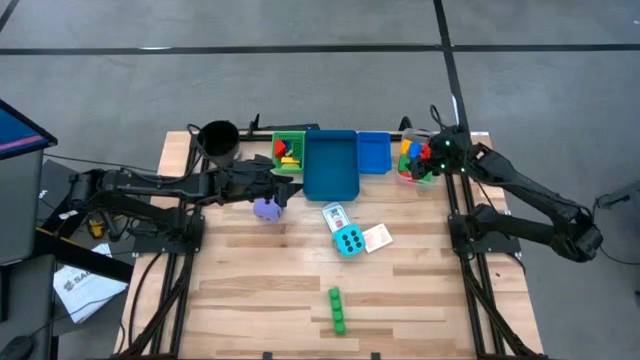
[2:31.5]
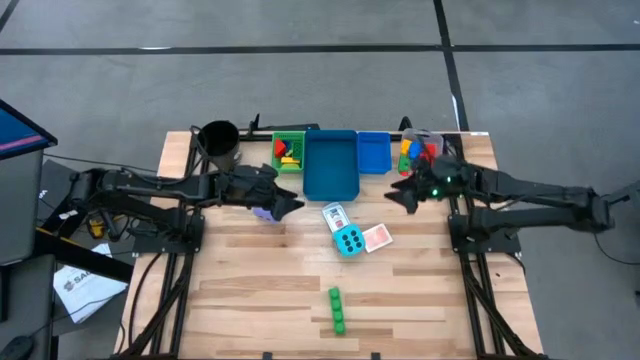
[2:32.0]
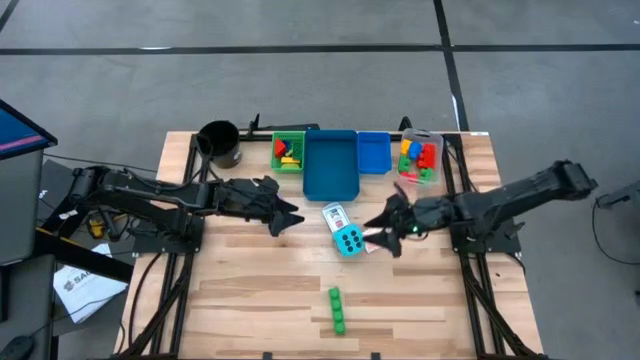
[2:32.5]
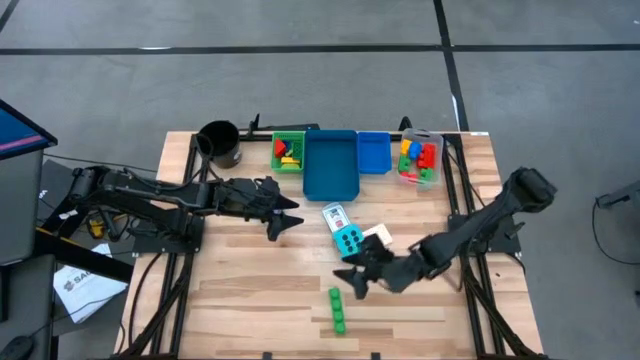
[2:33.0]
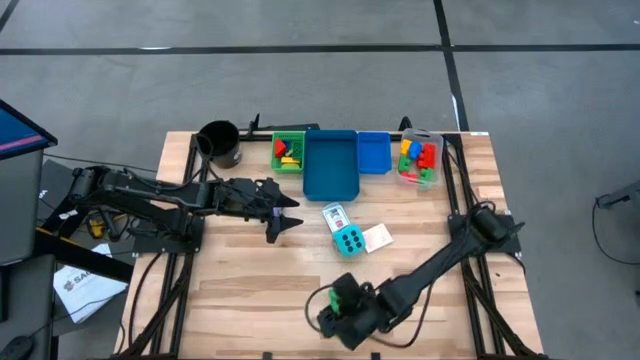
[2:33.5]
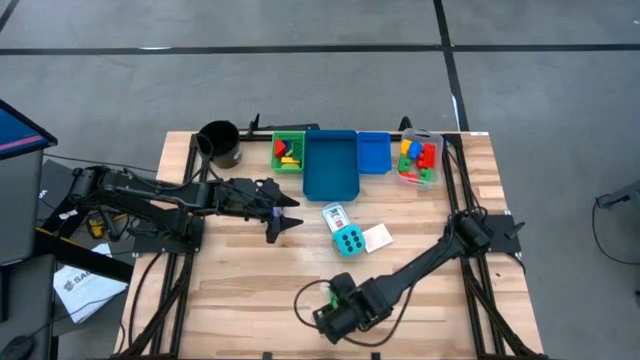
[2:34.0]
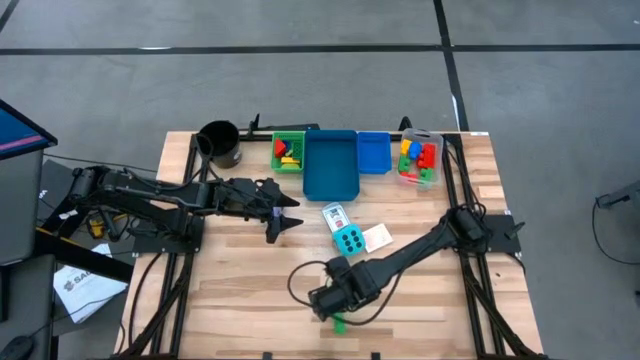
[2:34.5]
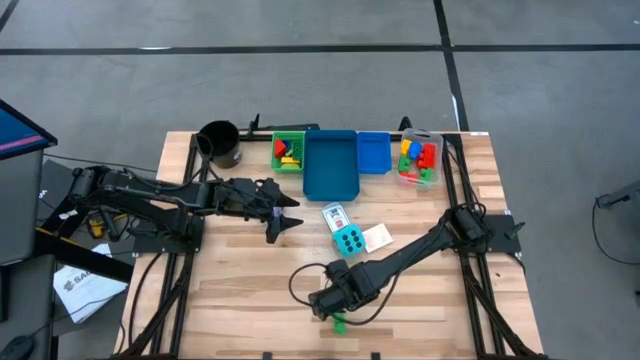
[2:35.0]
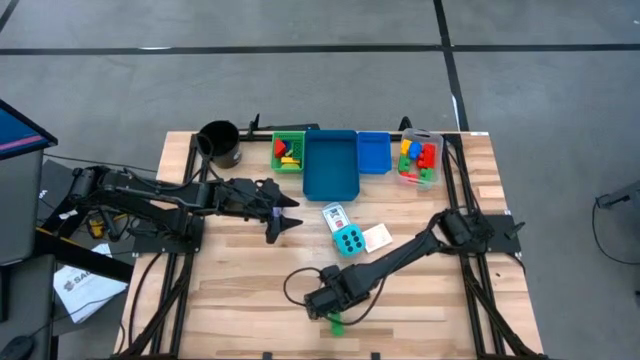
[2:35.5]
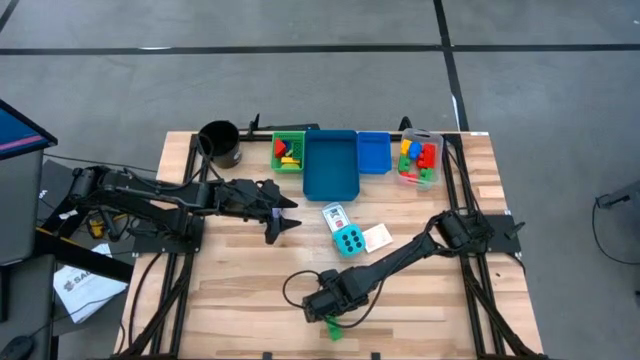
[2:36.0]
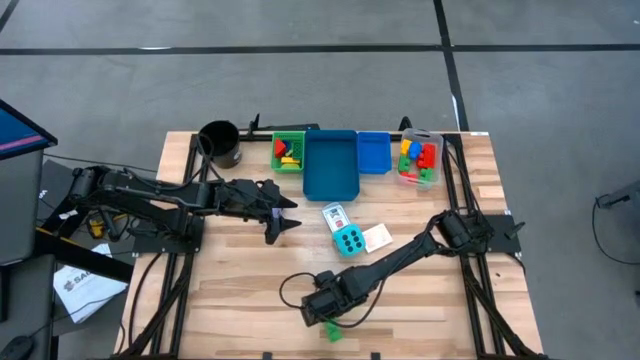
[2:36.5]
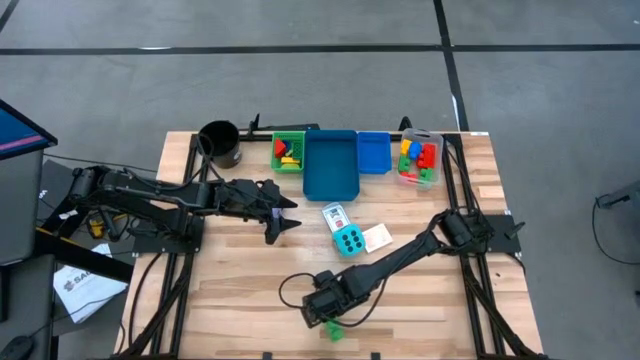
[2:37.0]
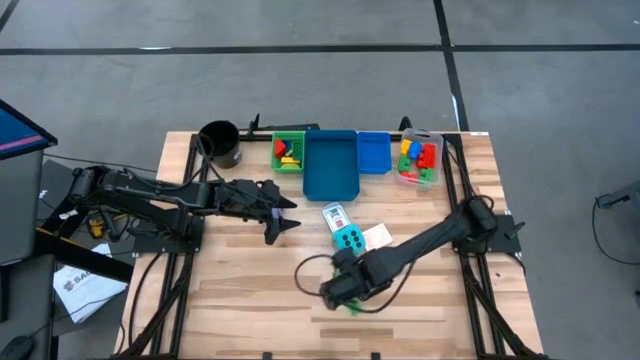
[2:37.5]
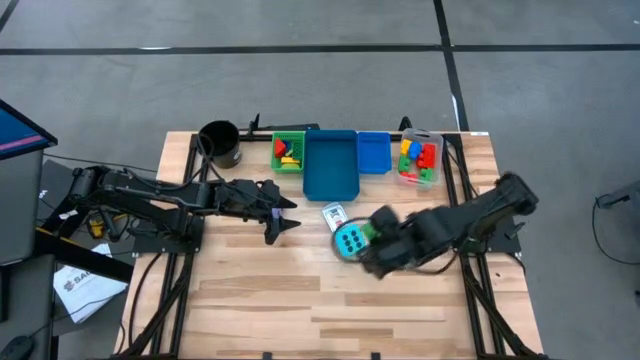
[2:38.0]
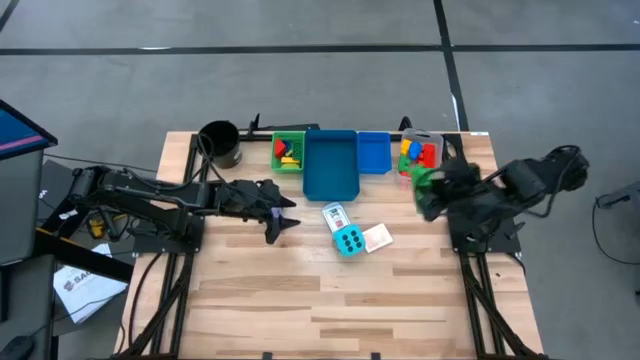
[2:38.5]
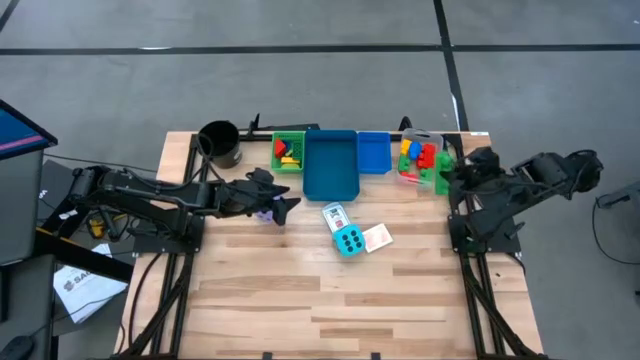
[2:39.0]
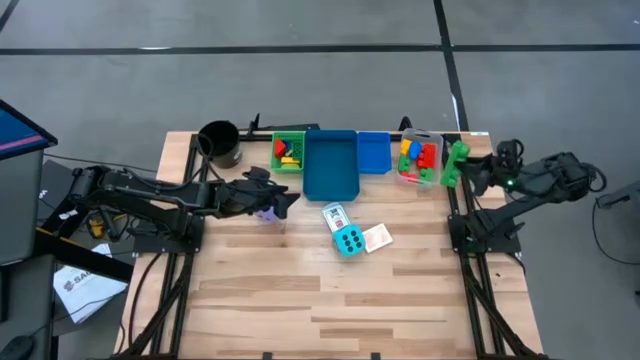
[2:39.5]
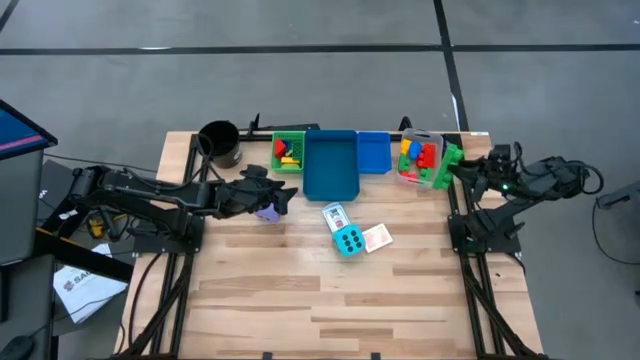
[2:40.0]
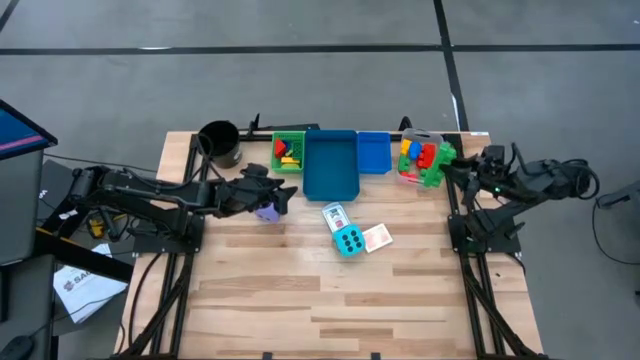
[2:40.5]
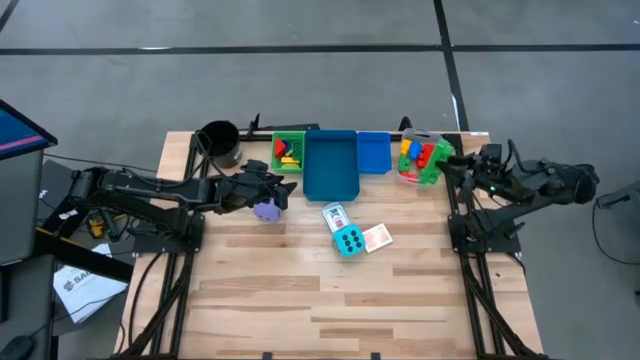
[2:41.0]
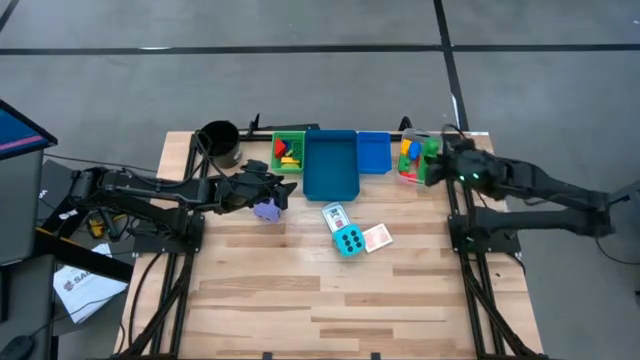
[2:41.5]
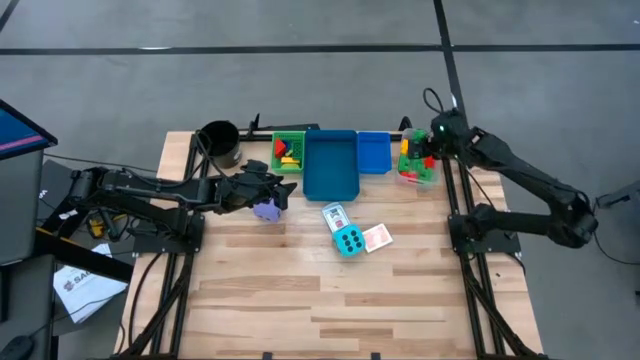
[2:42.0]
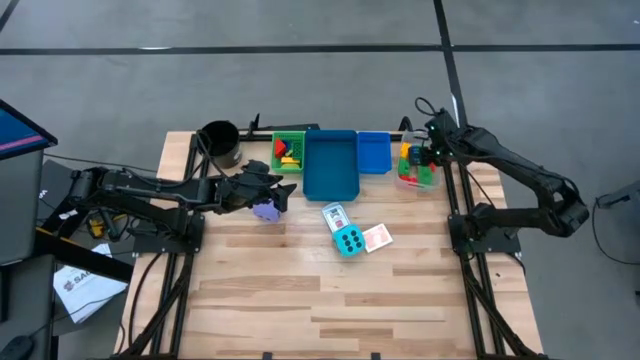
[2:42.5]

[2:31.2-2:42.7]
Task: Pick & Place Toys
Put the large green game piece into the transparent bin

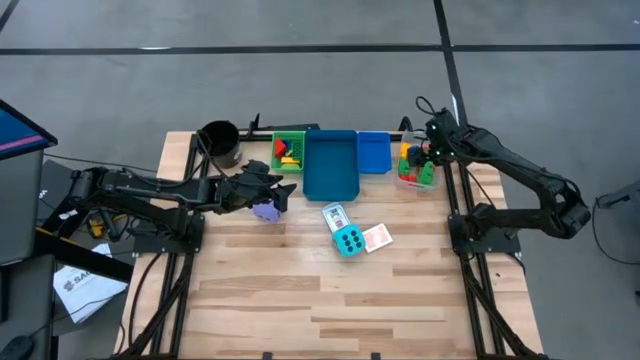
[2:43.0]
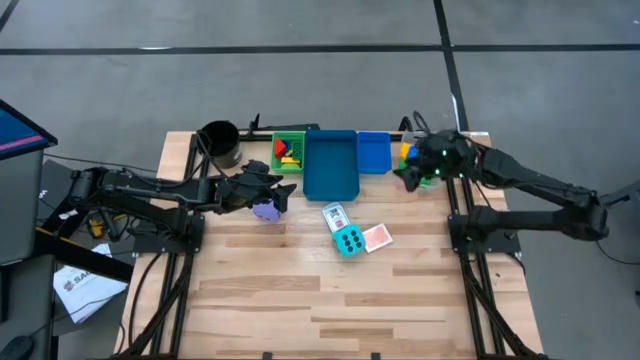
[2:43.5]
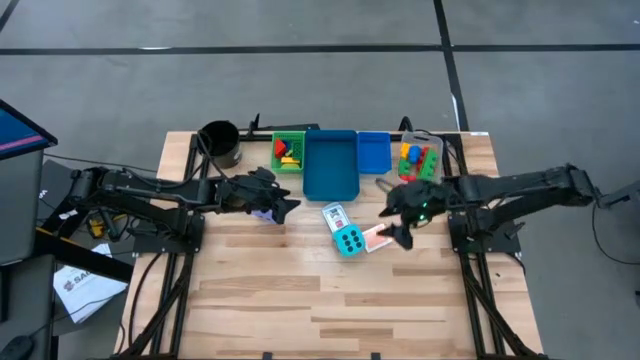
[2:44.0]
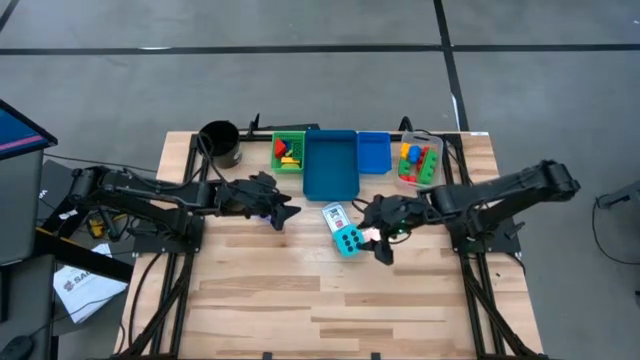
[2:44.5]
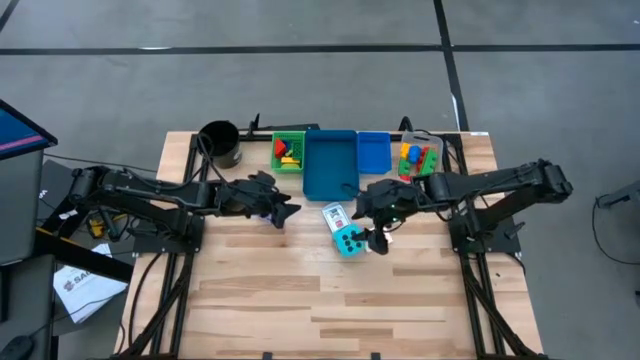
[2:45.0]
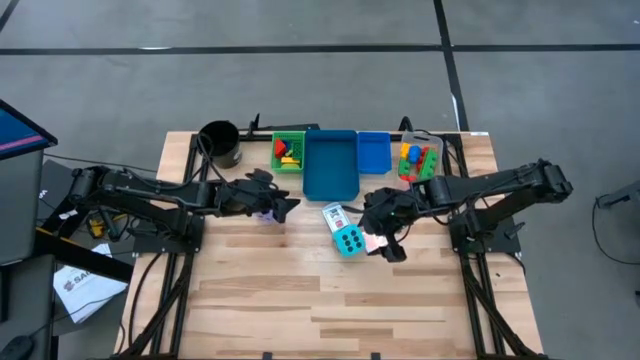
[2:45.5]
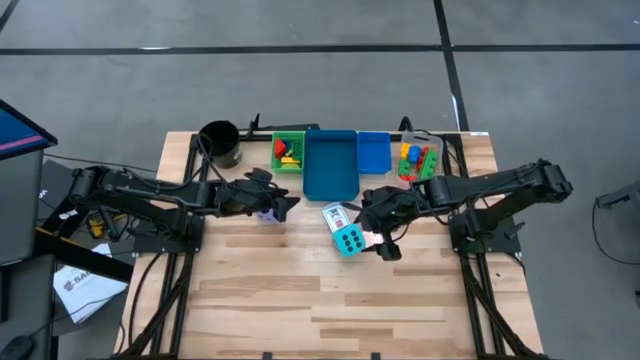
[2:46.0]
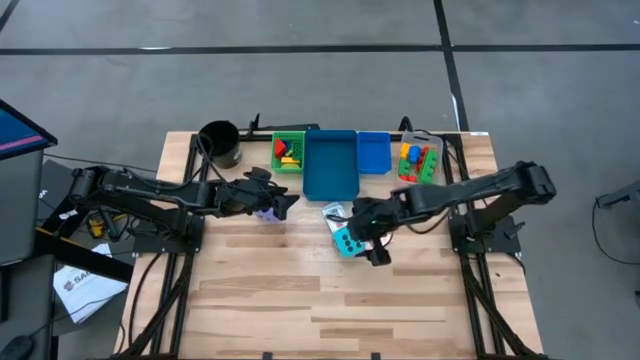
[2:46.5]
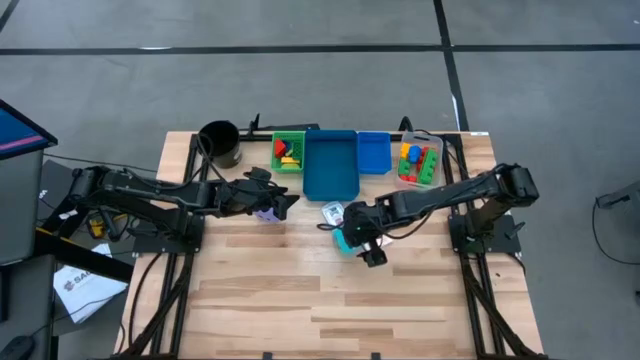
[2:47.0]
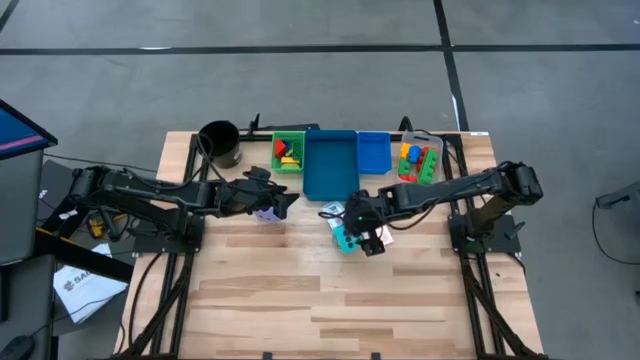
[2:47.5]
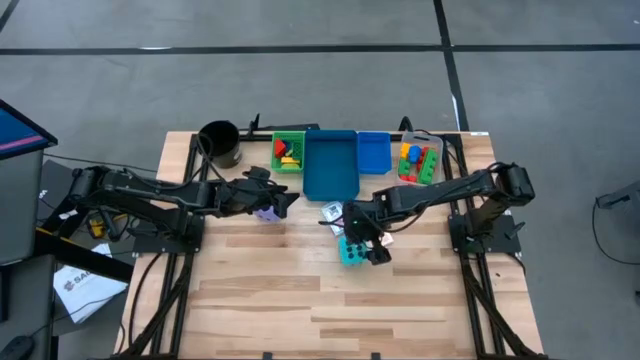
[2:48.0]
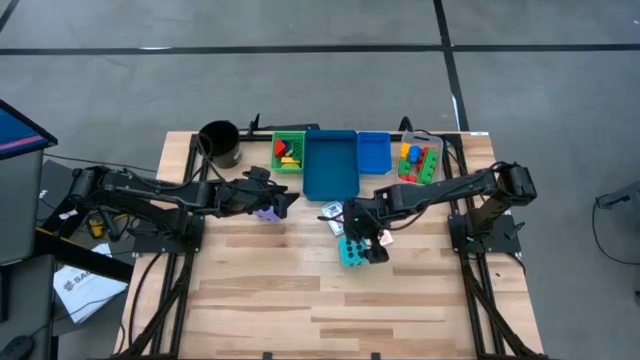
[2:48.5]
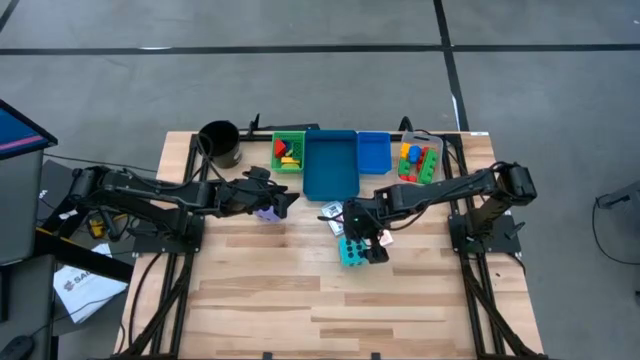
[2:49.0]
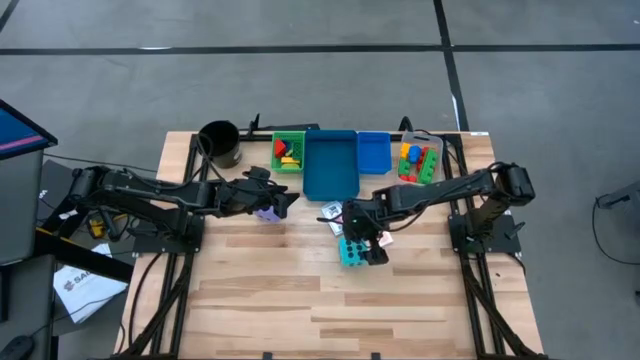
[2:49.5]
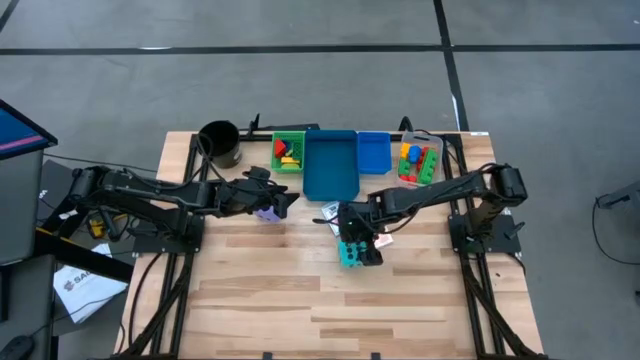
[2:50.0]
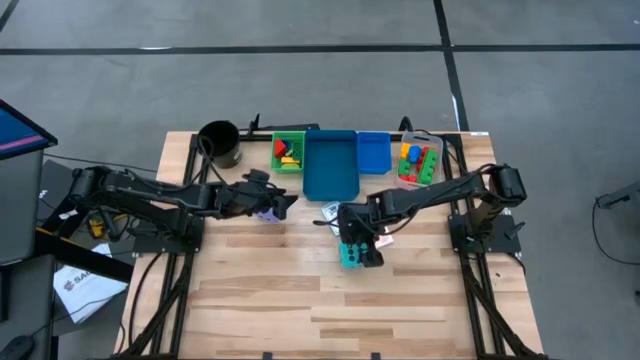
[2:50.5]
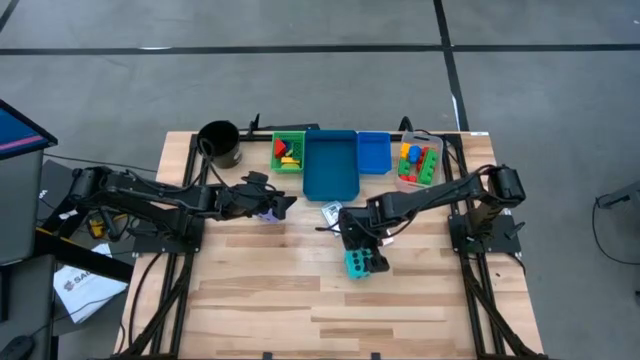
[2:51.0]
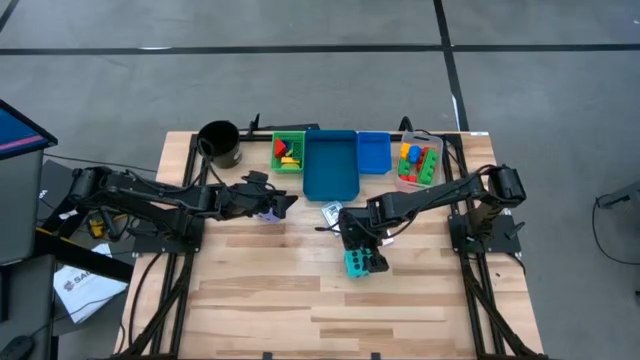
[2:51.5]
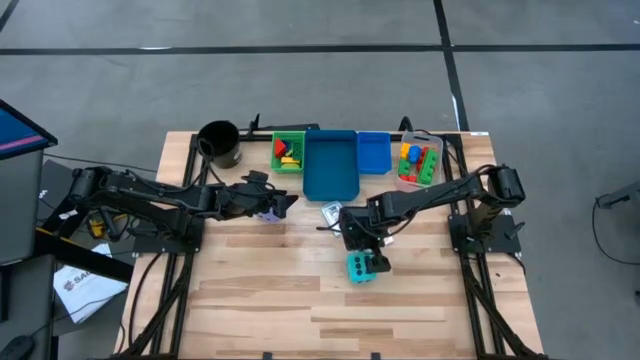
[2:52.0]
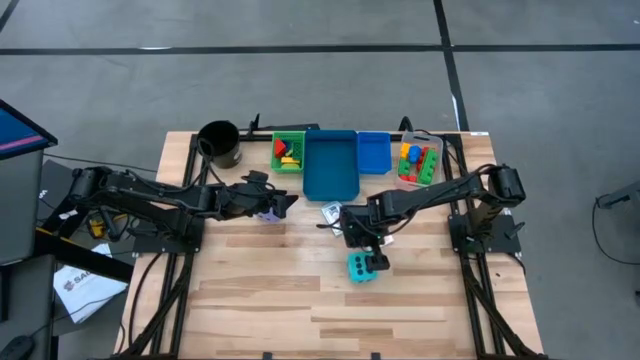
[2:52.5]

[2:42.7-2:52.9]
Put the blue die into the blue bin
